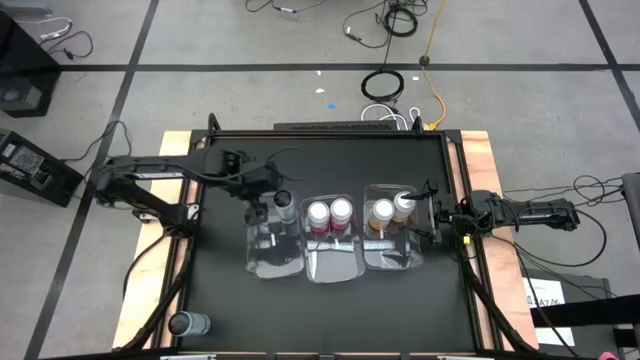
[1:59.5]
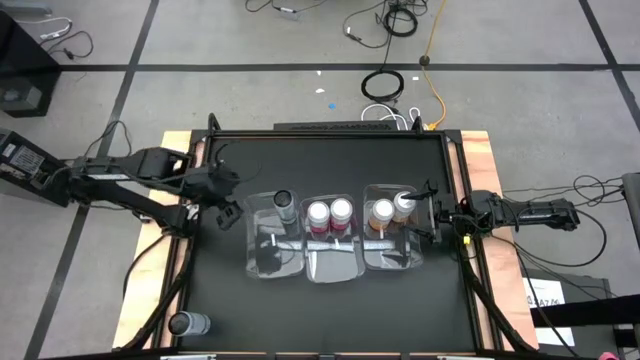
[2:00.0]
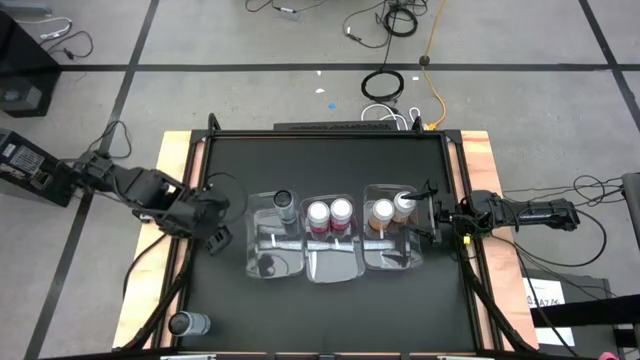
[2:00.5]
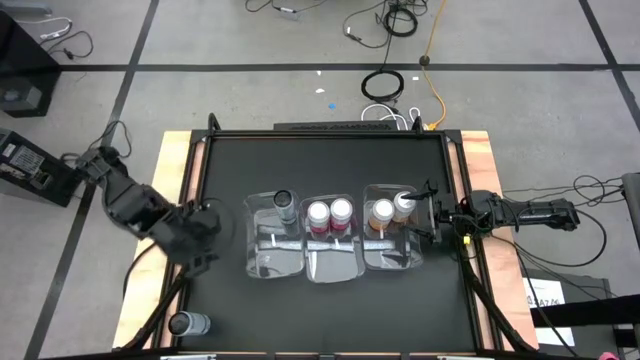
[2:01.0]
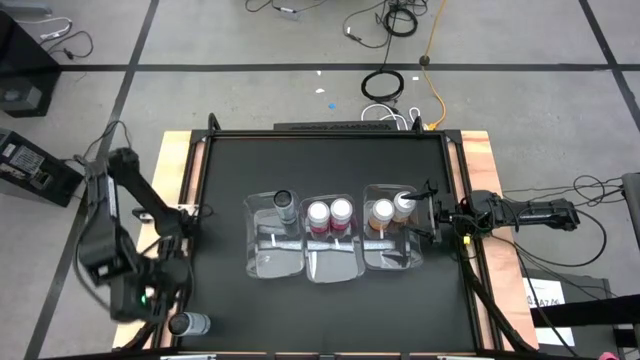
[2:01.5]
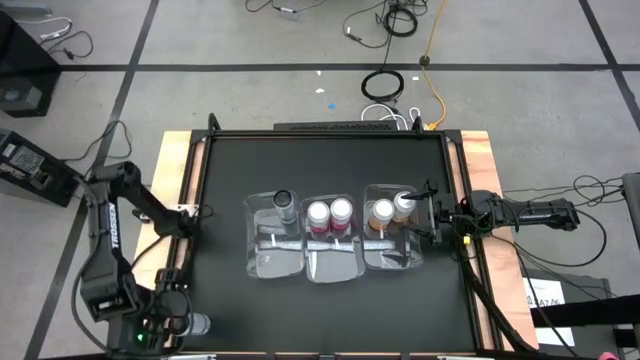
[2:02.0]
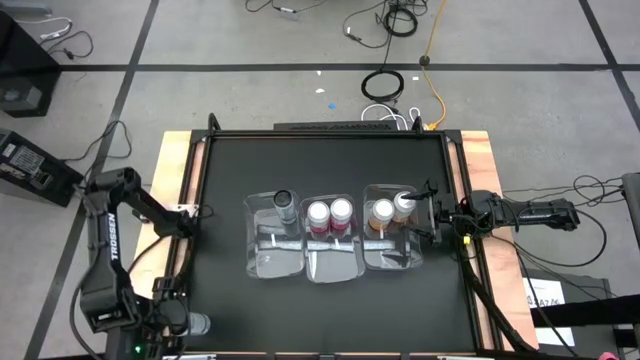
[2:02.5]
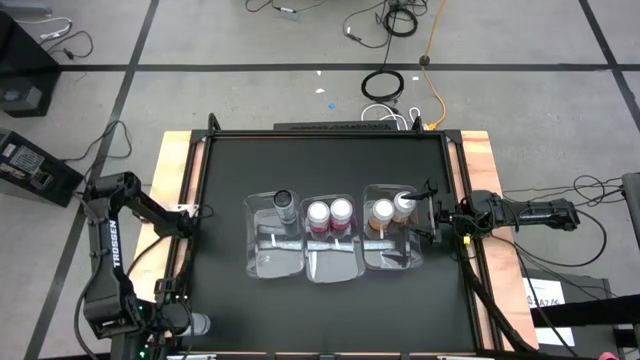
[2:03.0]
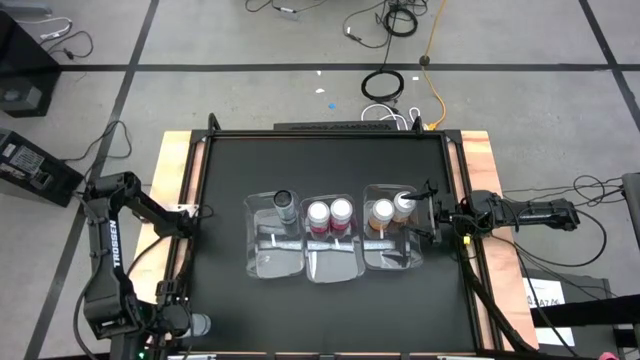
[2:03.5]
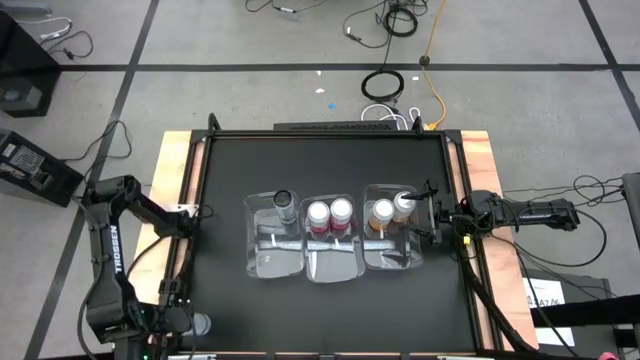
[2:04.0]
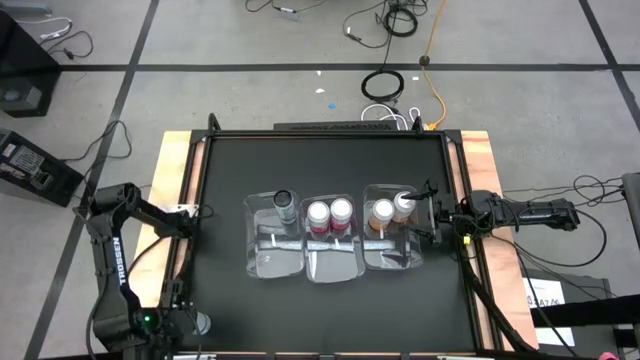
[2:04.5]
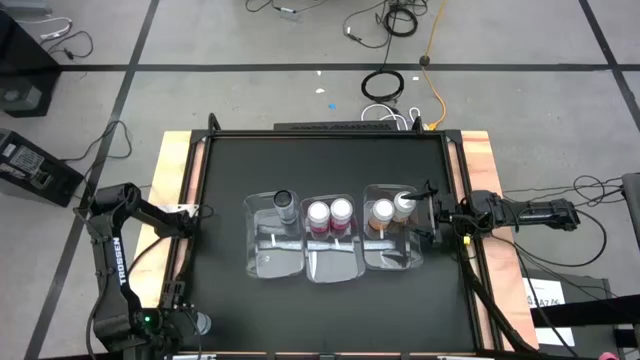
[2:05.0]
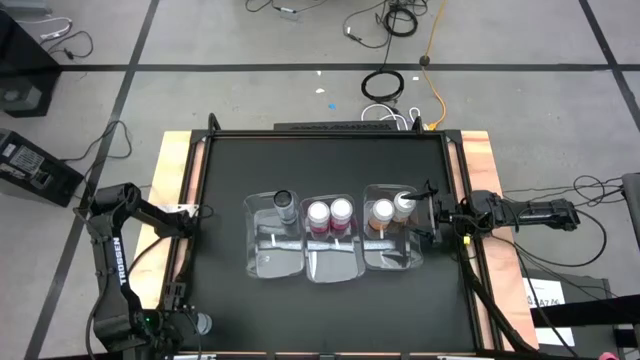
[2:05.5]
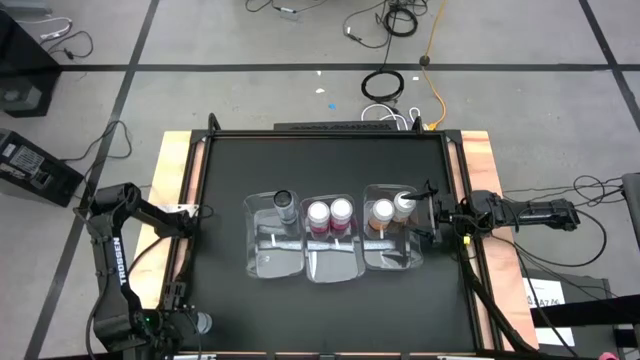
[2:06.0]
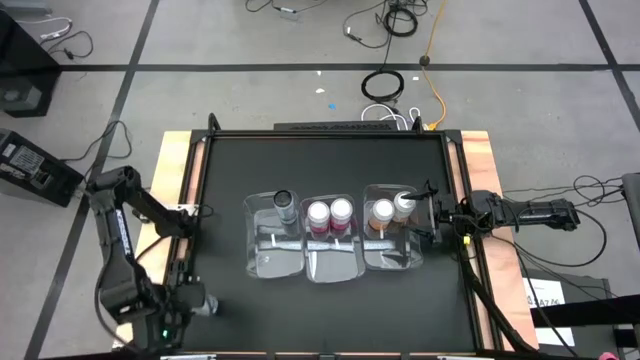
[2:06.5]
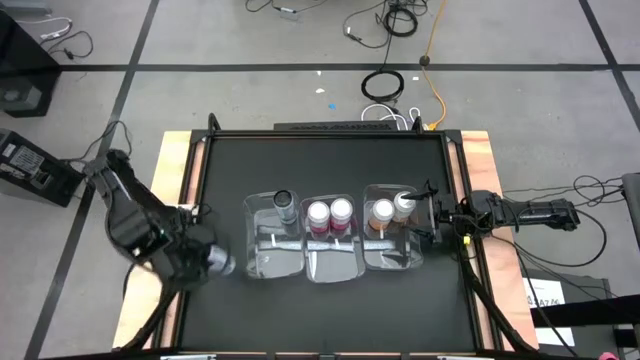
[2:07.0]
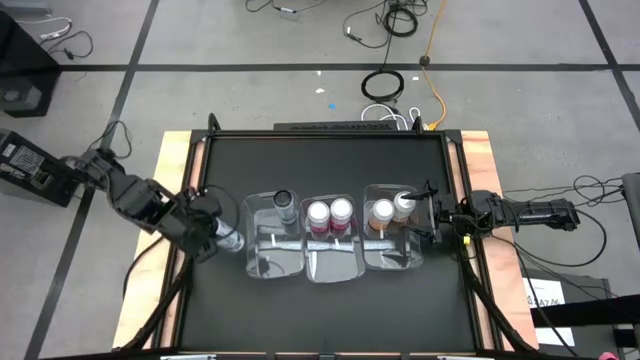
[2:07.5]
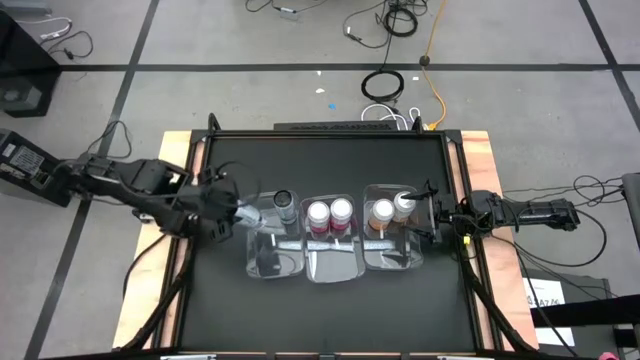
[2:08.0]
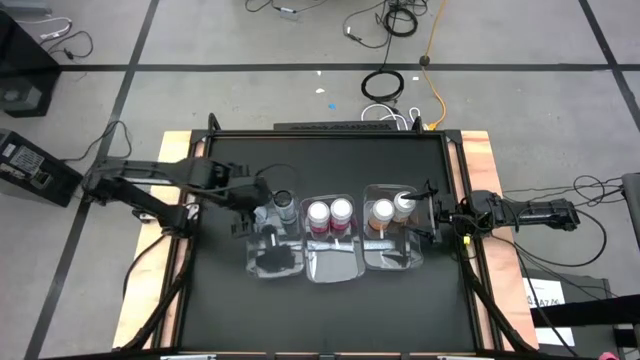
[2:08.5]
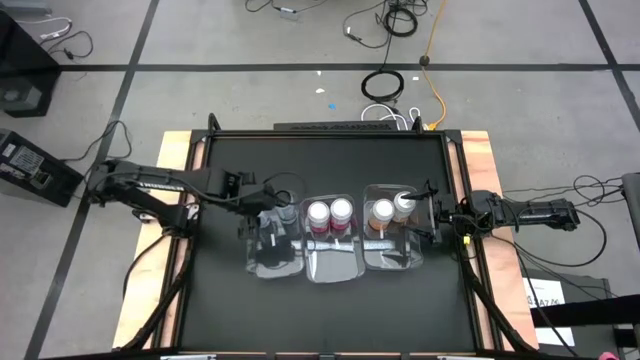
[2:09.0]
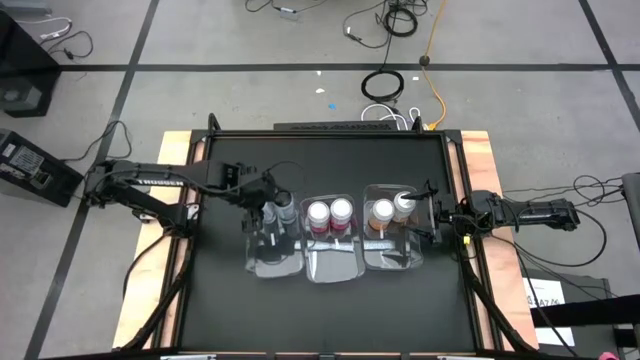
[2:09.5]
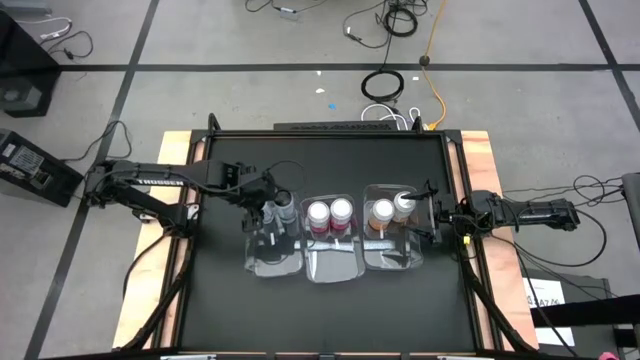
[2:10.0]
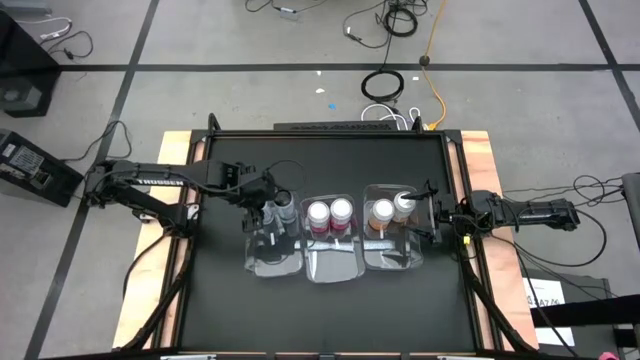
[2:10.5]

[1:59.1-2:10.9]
Task: Sort soda cans
Put the white soda can into the left transparent bin

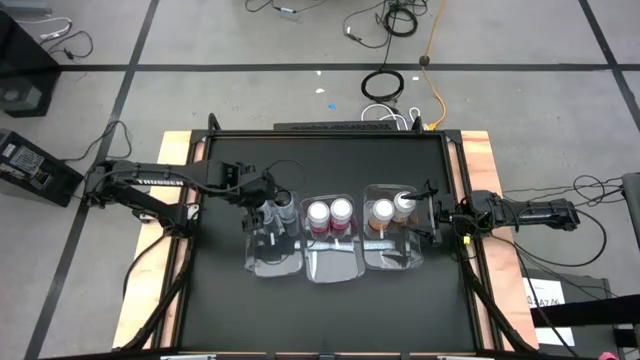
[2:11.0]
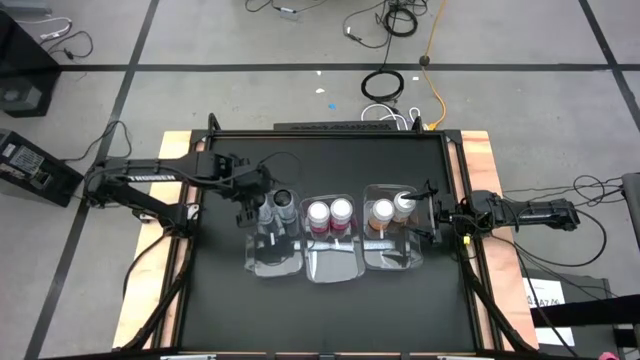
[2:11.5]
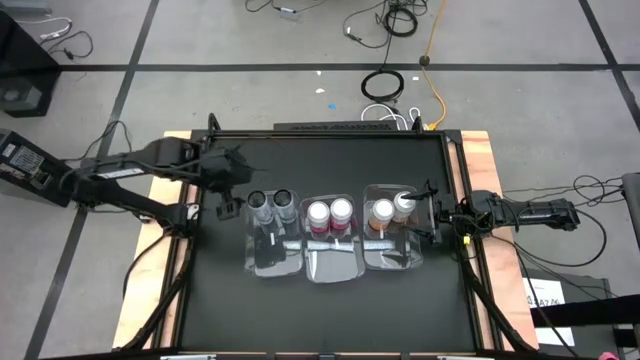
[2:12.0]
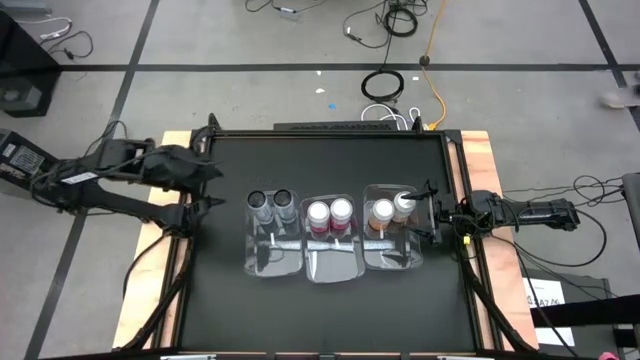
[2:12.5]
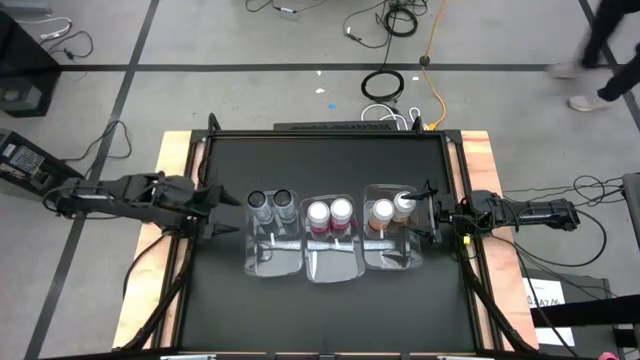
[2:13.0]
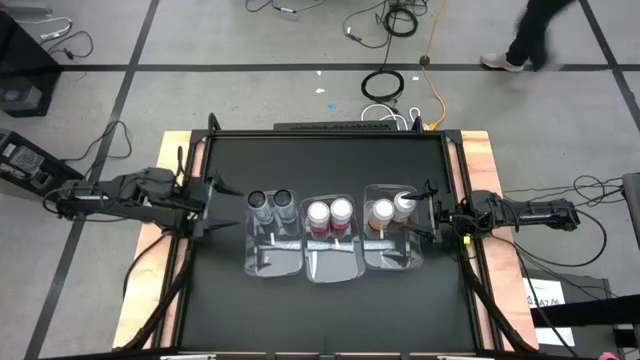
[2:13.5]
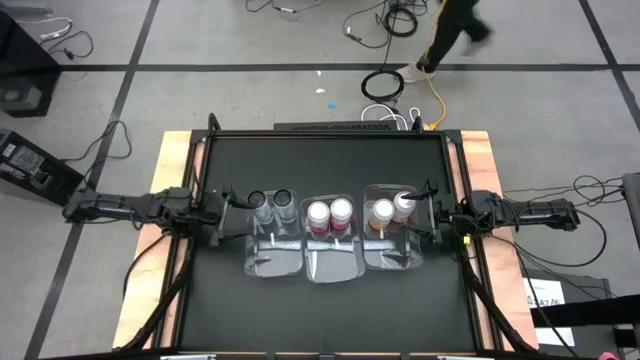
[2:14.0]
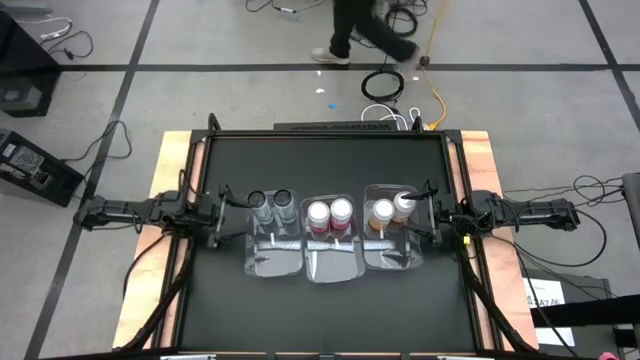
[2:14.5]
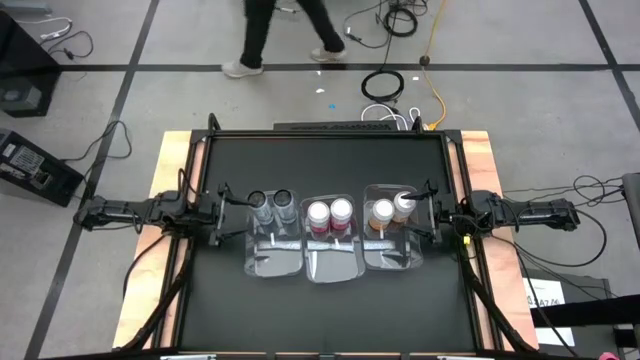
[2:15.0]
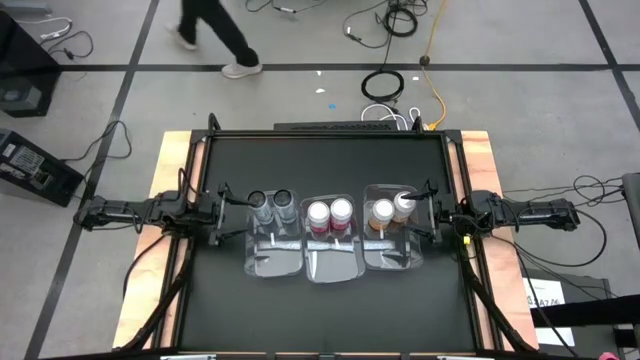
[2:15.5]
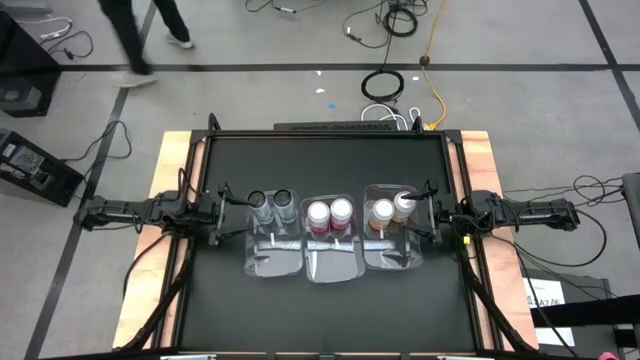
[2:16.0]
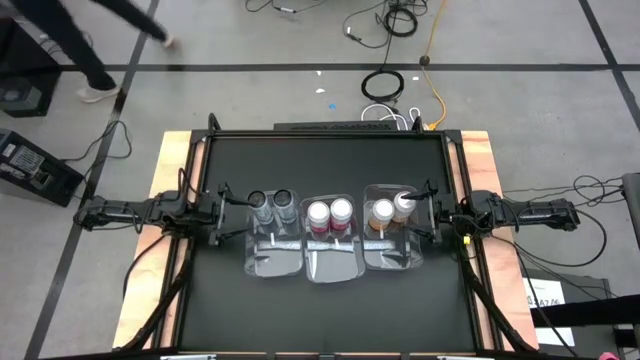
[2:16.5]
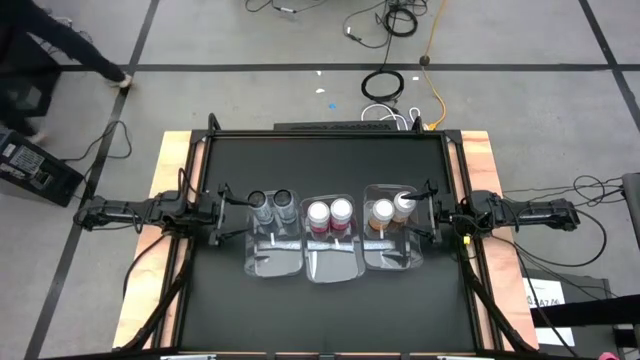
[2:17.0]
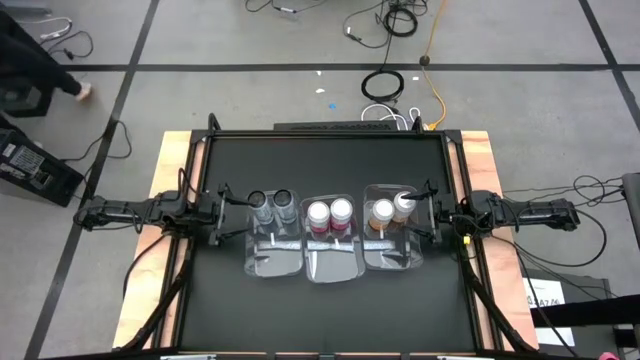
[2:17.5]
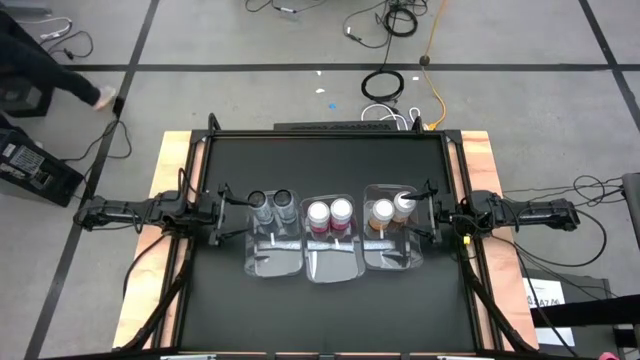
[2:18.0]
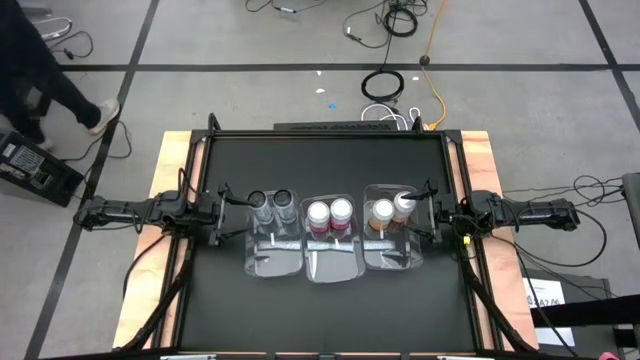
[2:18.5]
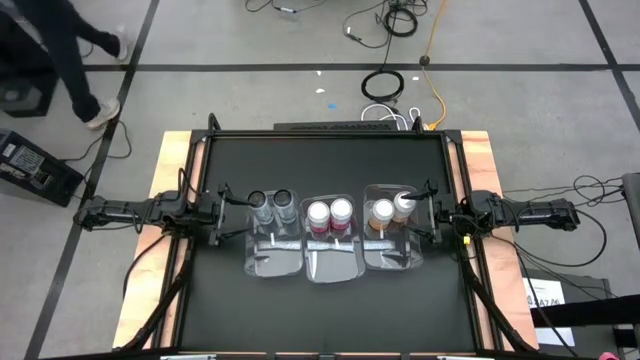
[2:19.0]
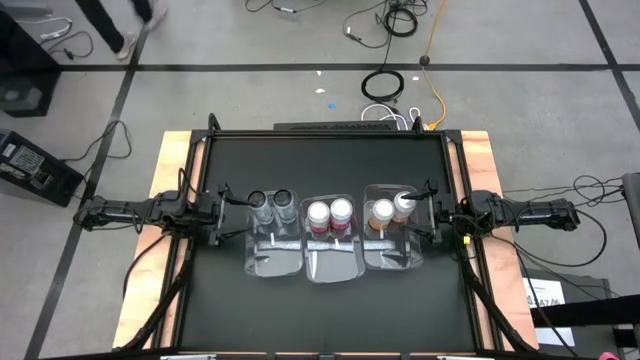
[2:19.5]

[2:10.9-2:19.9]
Return to Home Position

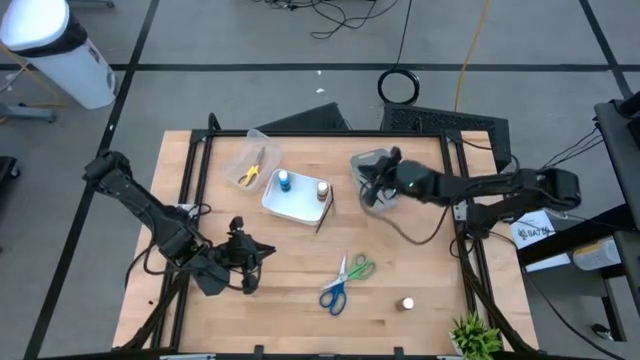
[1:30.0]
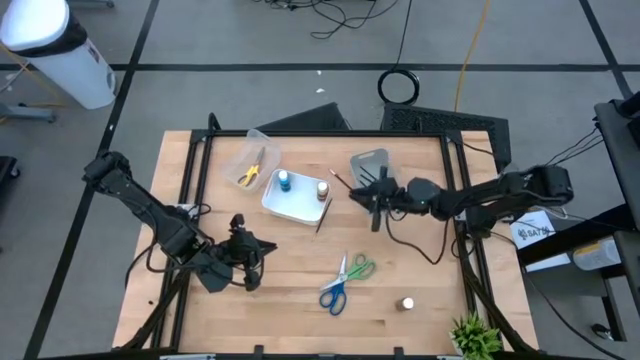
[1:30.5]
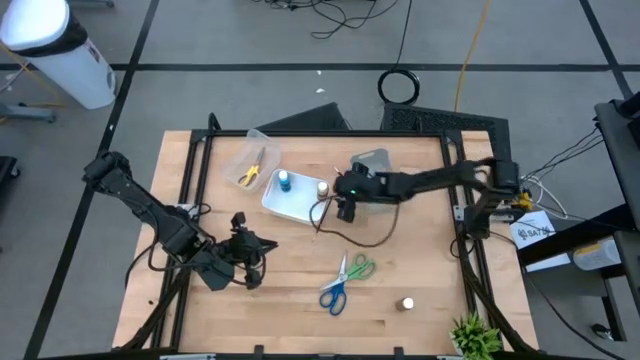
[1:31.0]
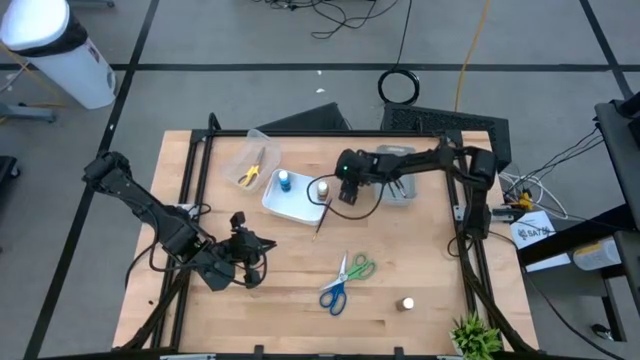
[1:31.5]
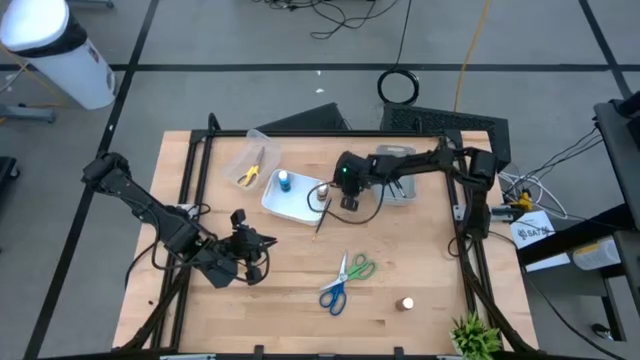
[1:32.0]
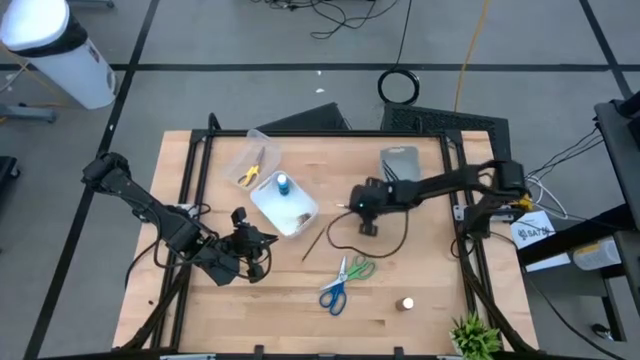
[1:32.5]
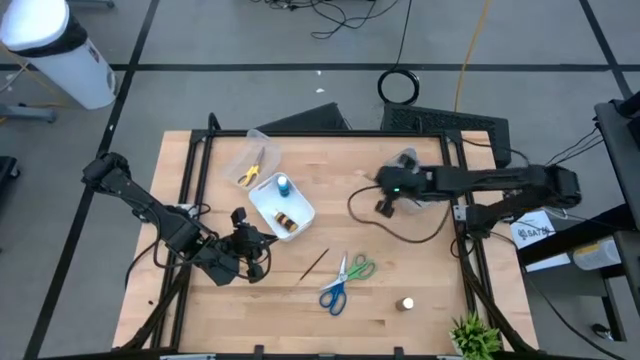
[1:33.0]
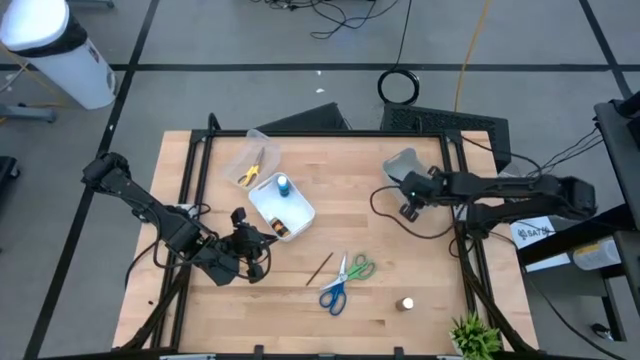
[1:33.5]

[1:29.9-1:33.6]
Task: Pick & Place Paint Supplies
Put the silver and black paintbrush into the gray bin
